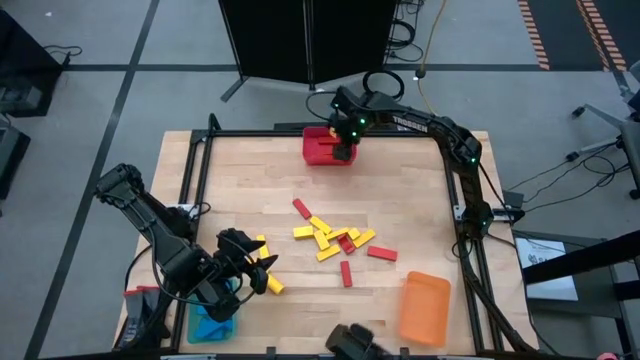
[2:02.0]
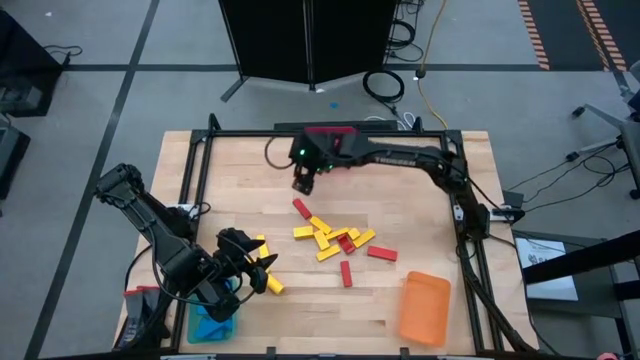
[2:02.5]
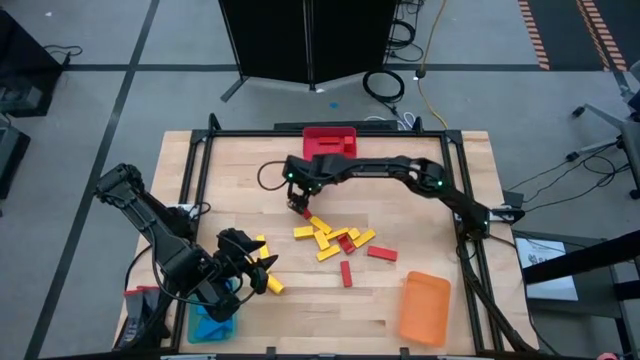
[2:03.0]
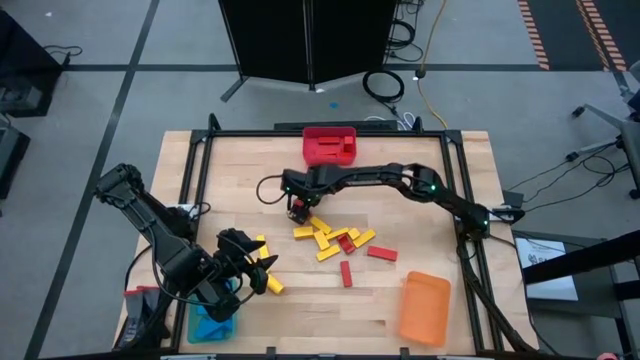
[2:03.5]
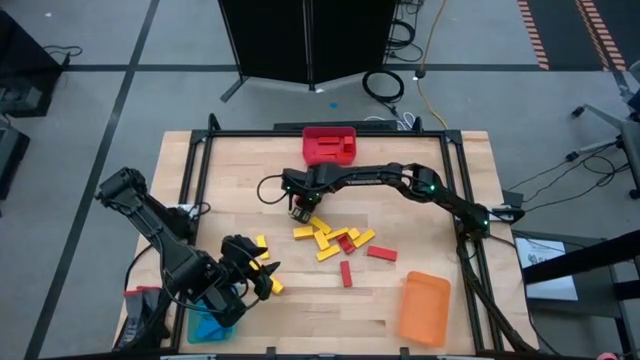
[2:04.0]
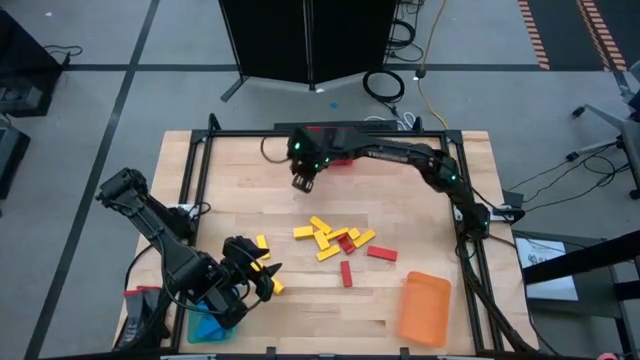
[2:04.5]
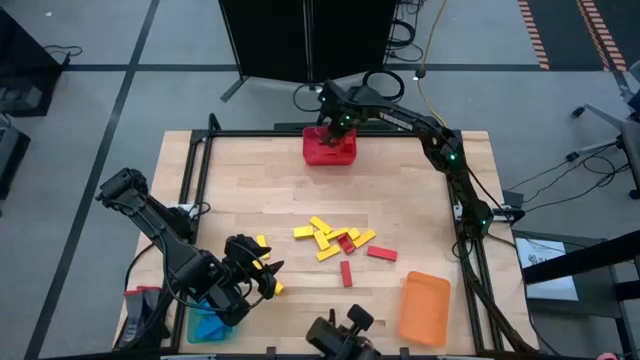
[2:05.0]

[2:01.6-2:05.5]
Task: Sort blocks
Put the red block into the red bin

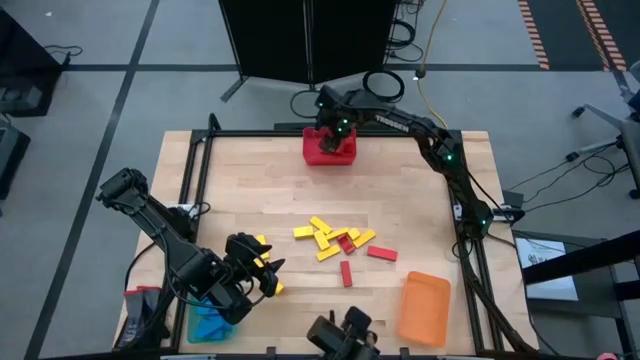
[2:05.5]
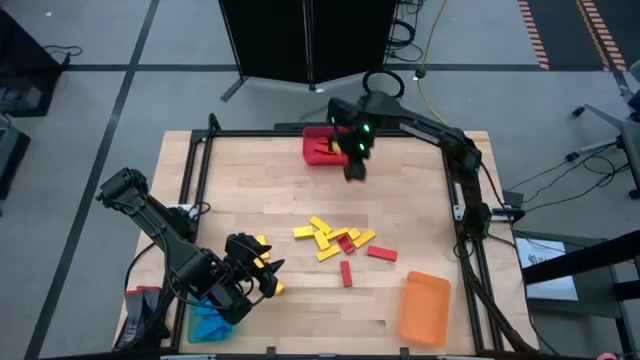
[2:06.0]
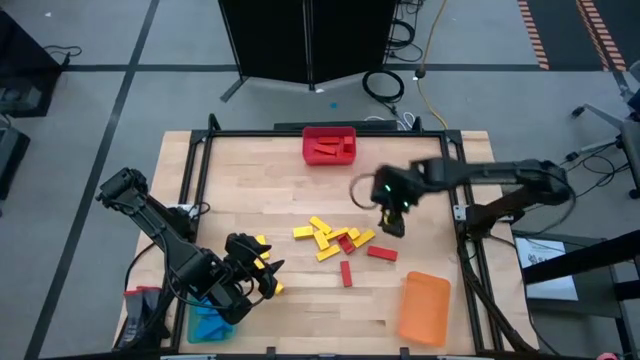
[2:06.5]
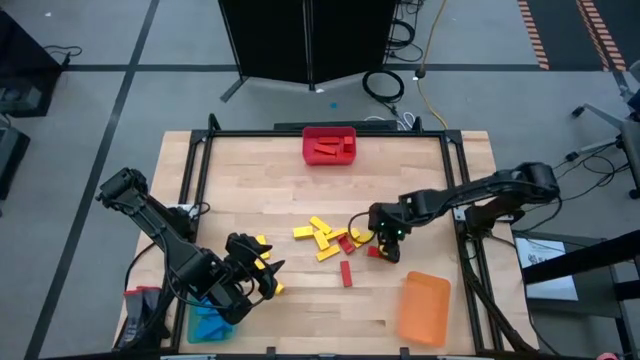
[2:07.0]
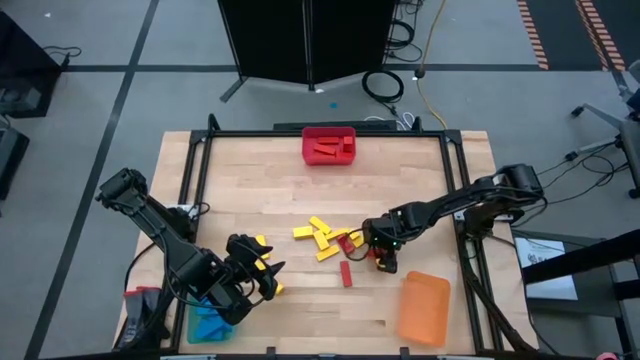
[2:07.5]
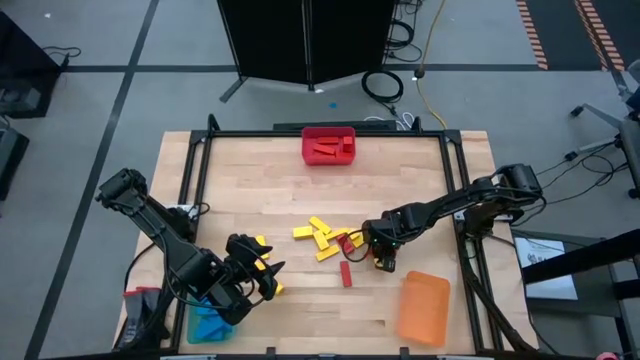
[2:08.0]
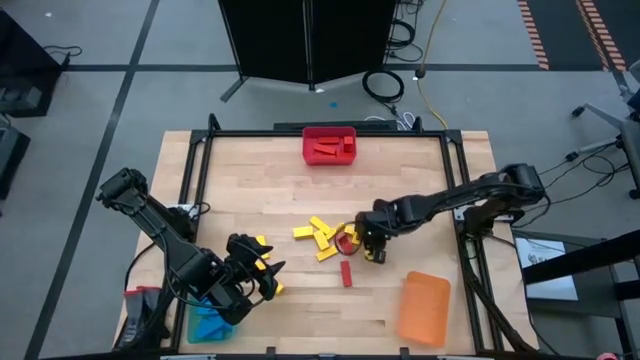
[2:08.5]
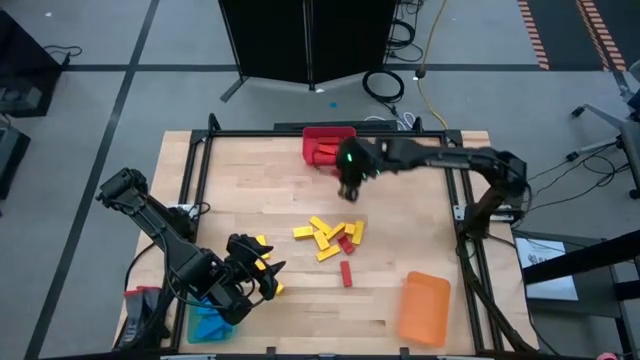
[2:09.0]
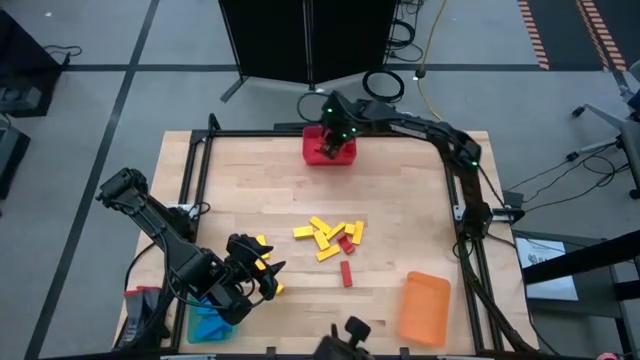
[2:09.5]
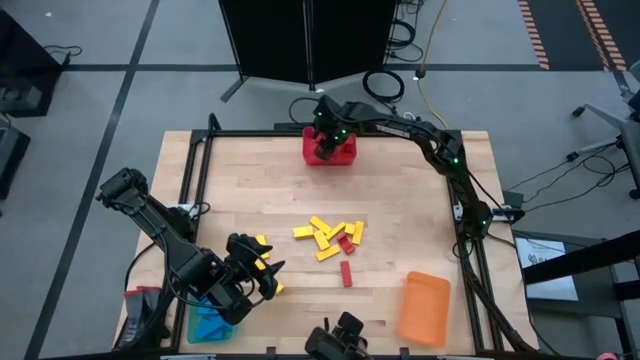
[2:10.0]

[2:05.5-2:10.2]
Put the red block into the red bin

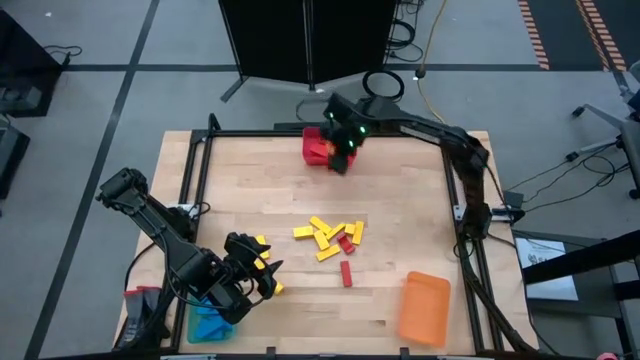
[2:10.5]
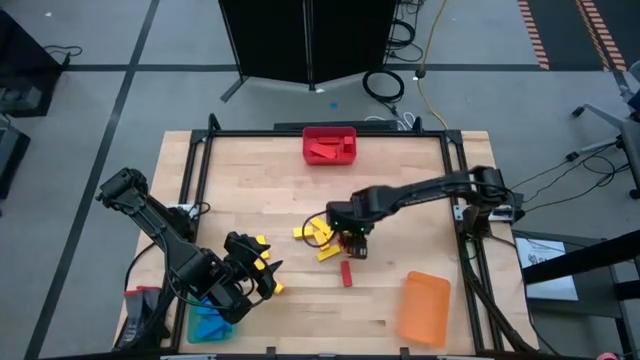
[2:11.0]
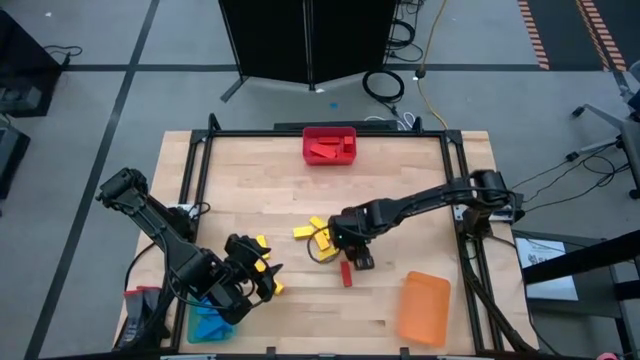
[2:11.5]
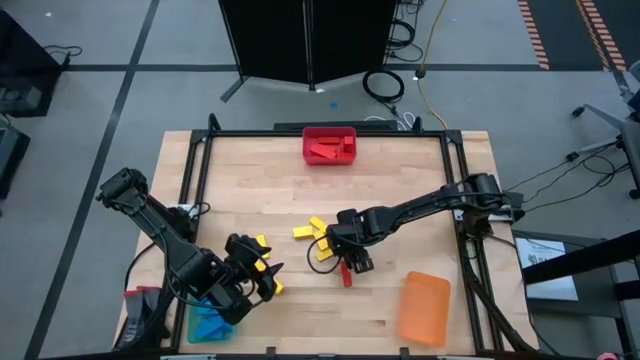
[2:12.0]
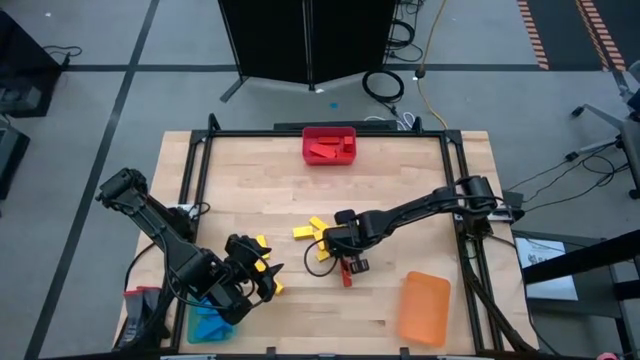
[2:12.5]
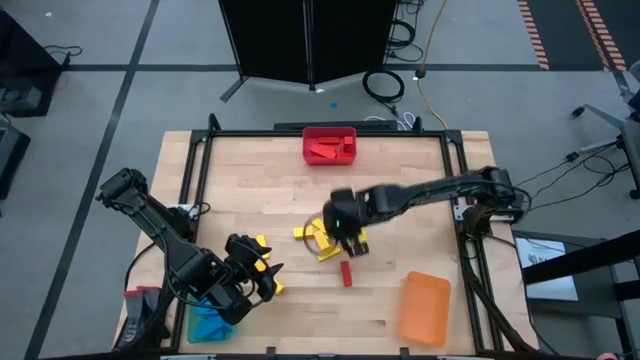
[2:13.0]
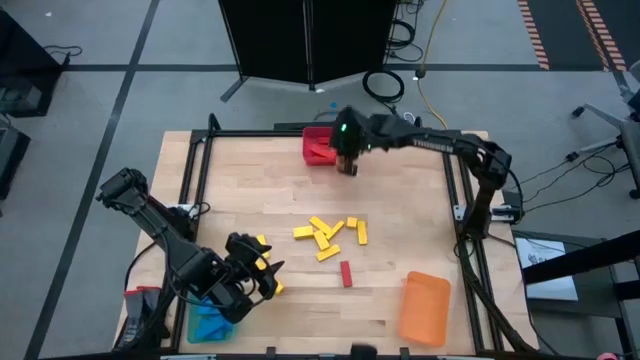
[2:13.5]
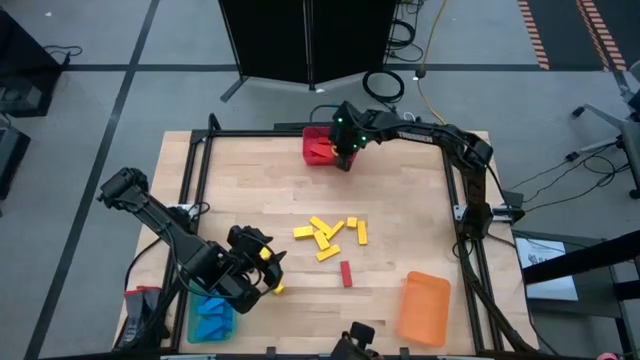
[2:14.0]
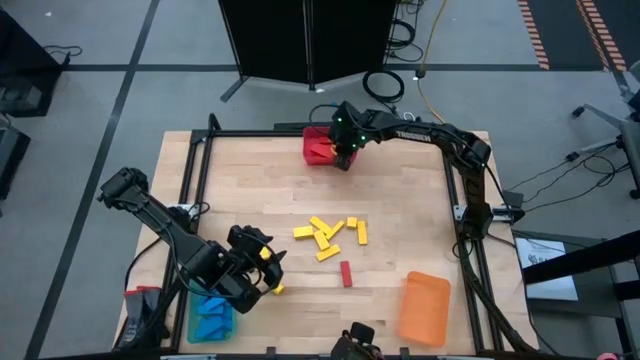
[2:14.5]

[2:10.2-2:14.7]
Put the red block into the red bin

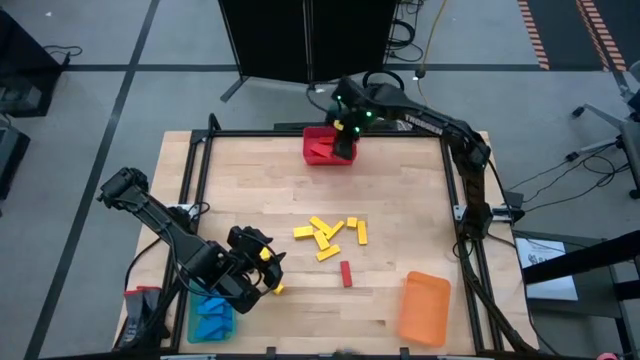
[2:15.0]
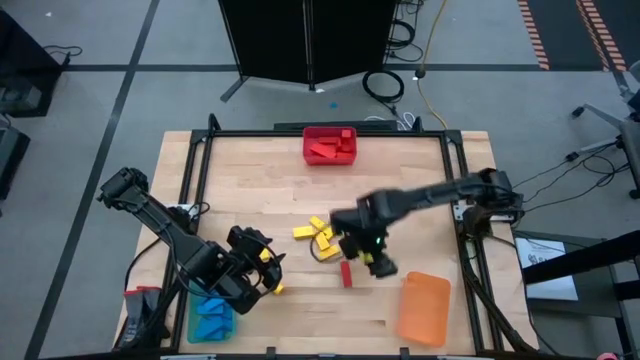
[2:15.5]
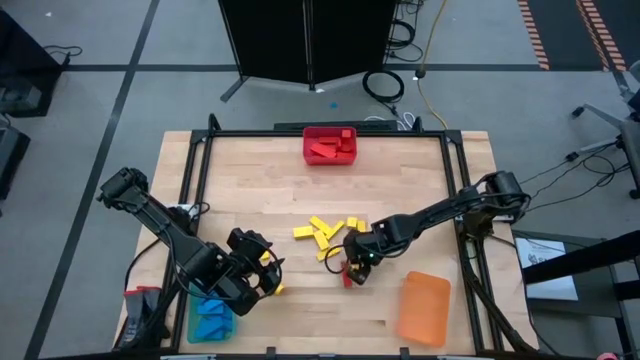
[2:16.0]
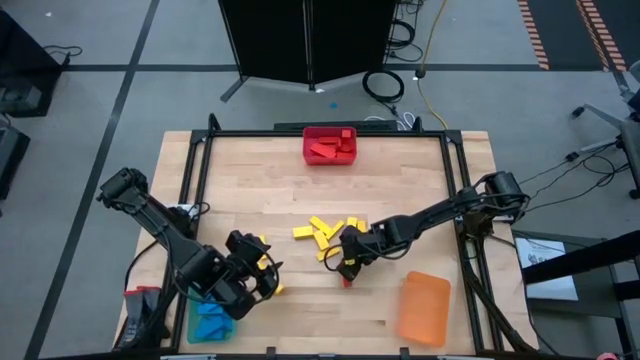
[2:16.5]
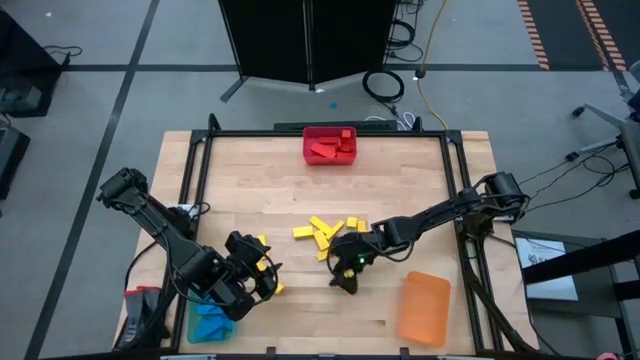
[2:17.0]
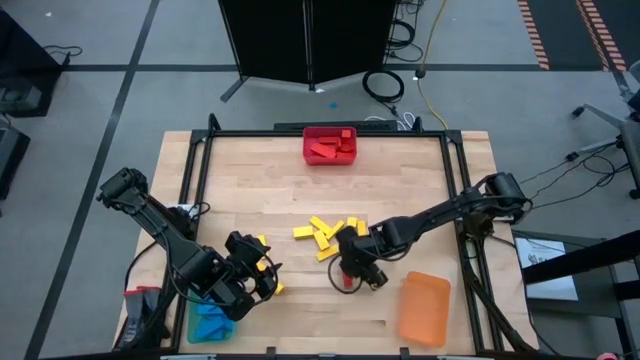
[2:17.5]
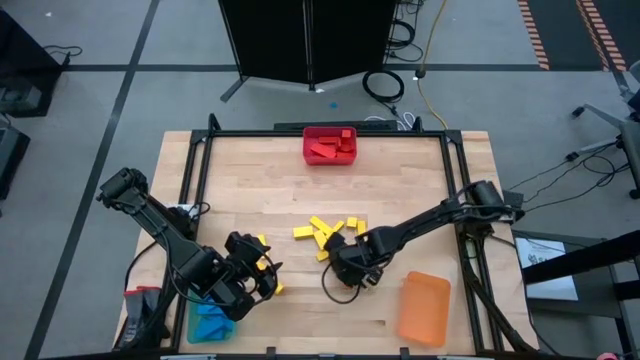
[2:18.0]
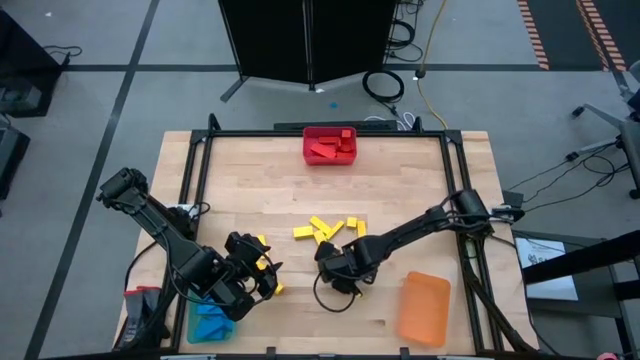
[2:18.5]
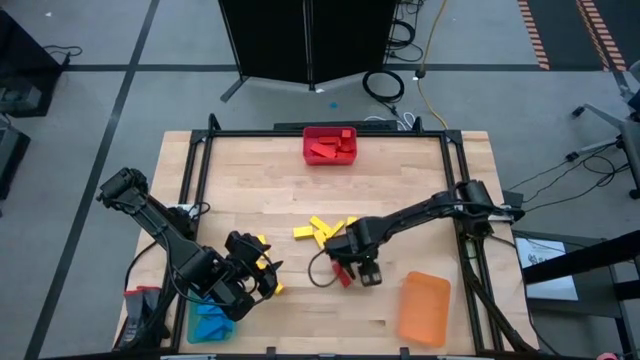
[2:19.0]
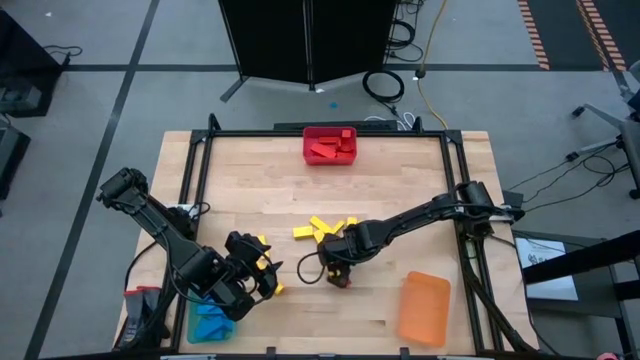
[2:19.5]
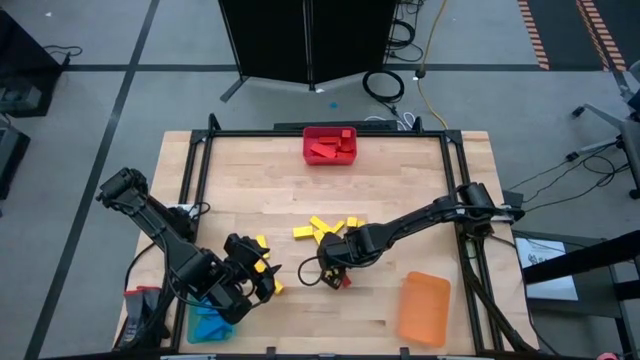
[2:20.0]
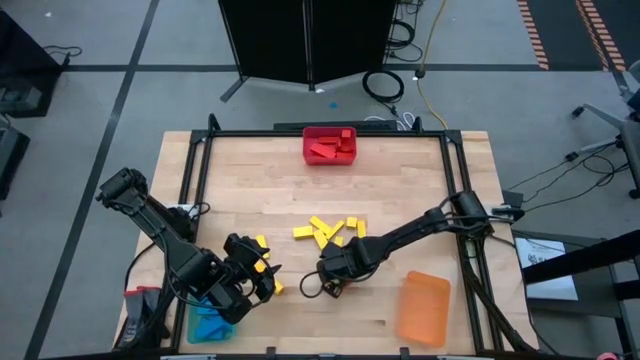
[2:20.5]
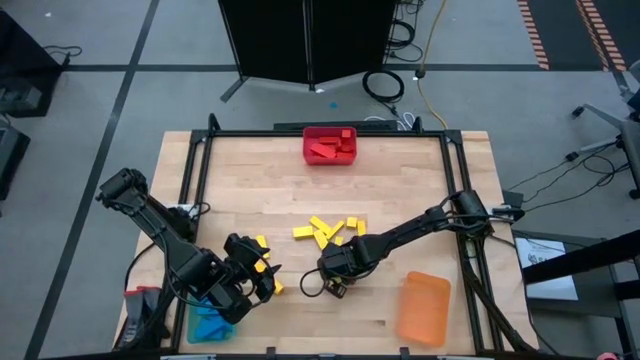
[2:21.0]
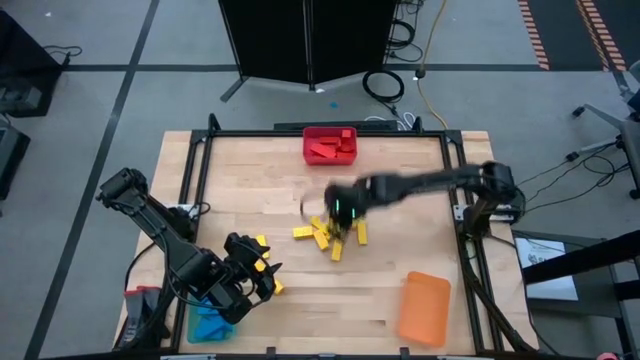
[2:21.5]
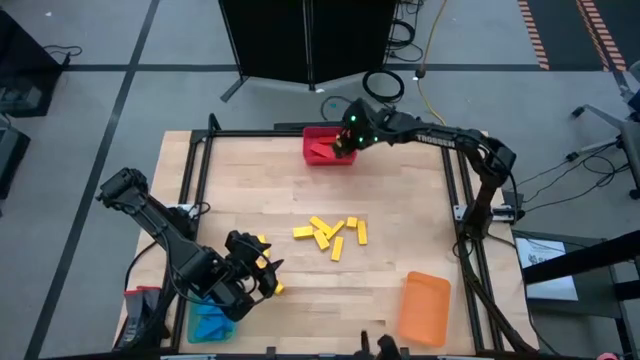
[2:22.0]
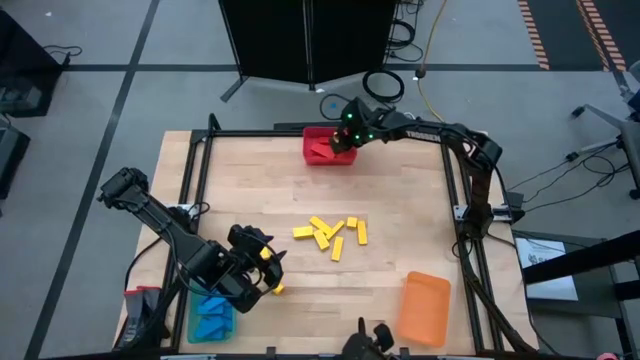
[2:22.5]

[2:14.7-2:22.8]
Put the red block into the red bin
